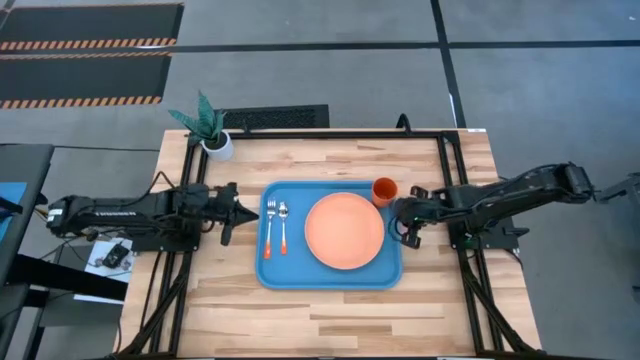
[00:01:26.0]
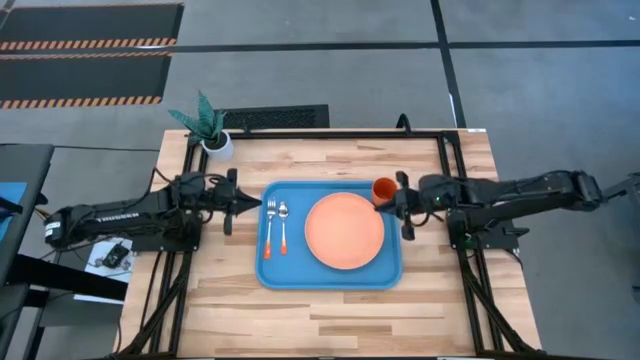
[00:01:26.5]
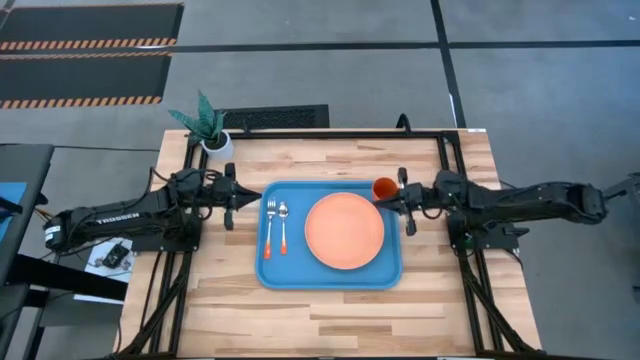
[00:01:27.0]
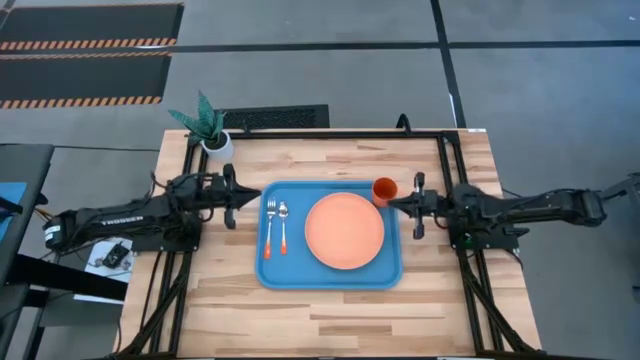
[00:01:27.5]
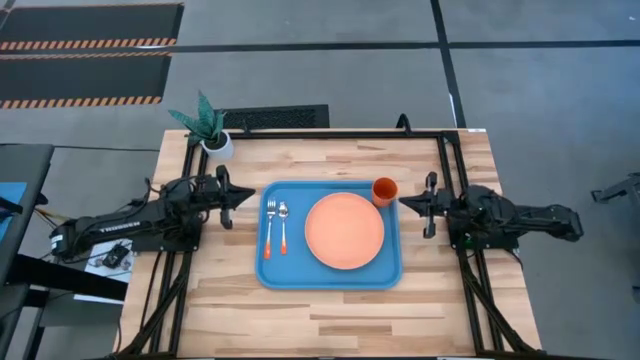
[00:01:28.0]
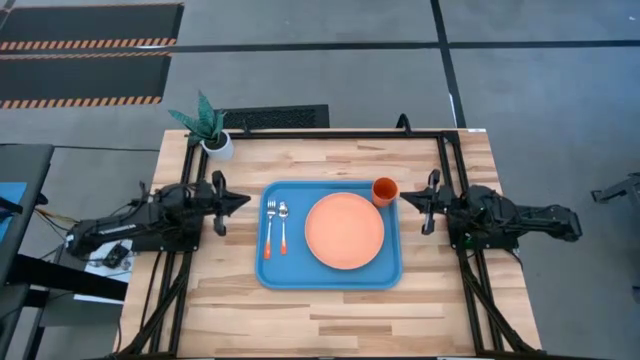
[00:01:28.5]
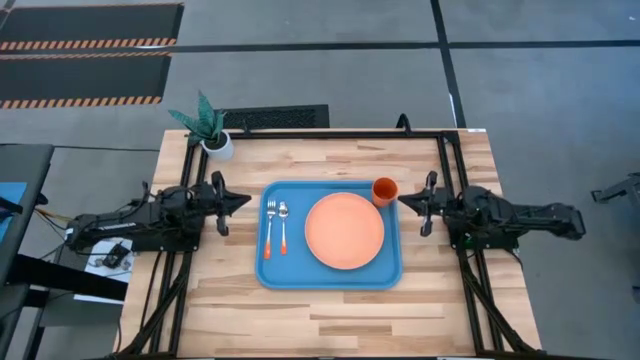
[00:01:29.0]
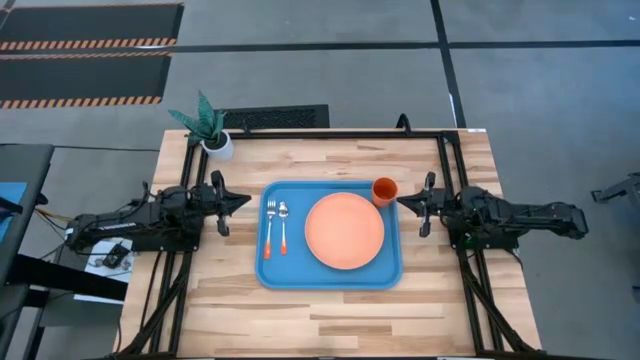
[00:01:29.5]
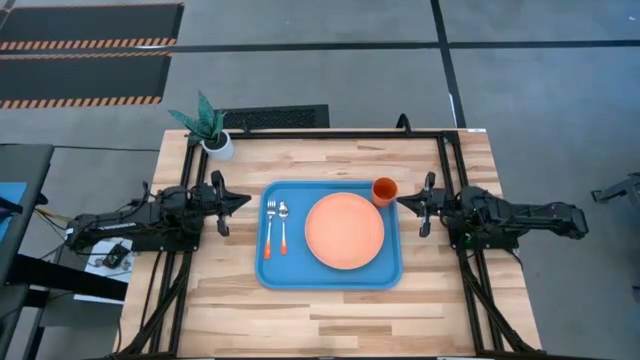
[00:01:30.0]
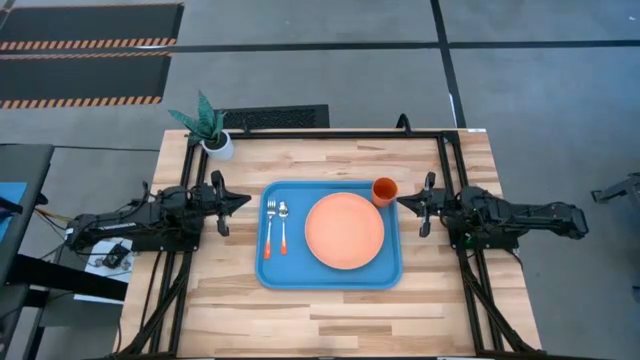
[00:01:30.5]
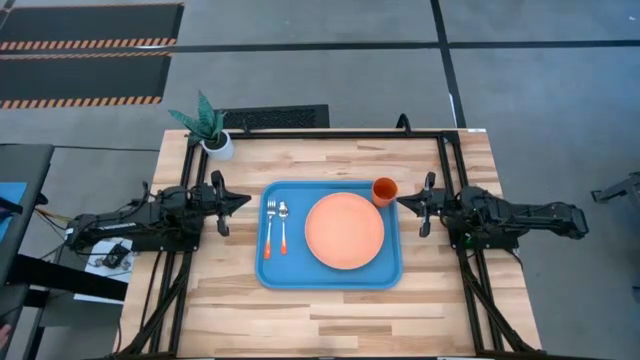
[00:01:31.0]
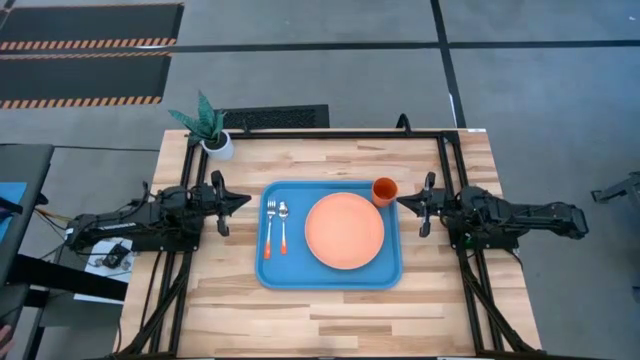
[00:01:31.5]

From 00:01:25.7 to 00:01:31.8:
Task: Pick and place plate/cup/fork/spoon on tray
Return to Home Position

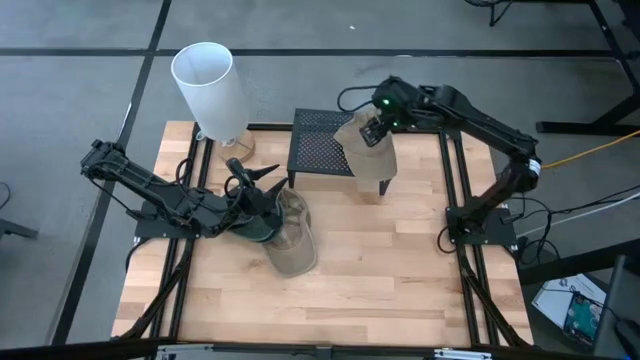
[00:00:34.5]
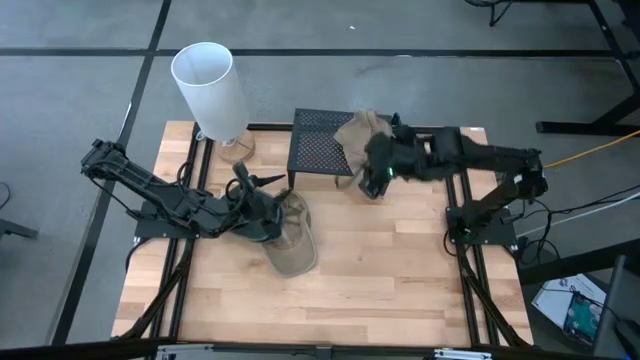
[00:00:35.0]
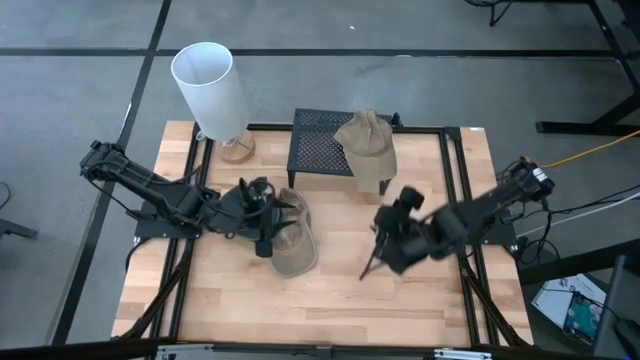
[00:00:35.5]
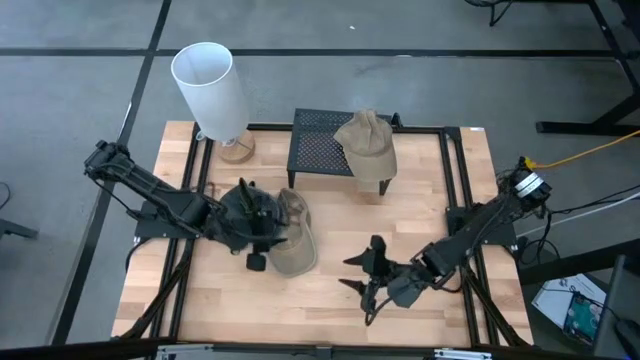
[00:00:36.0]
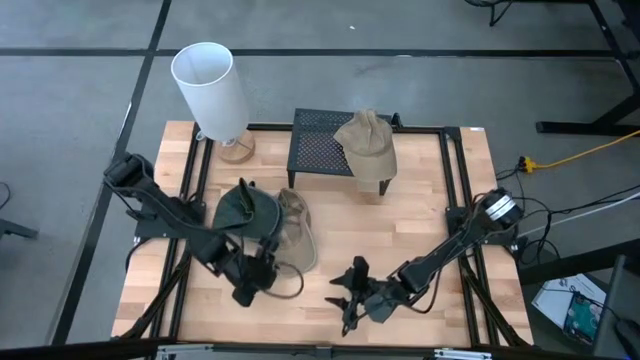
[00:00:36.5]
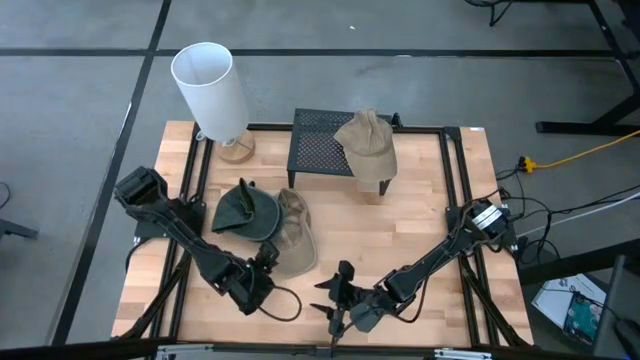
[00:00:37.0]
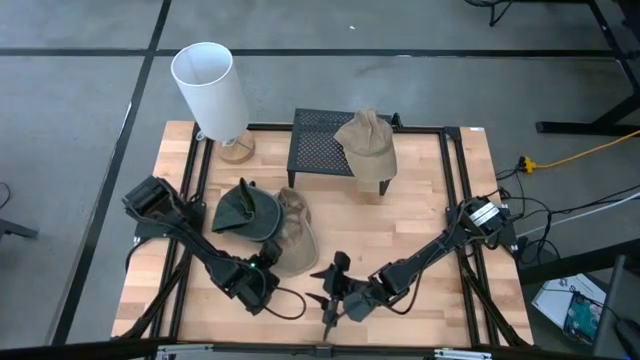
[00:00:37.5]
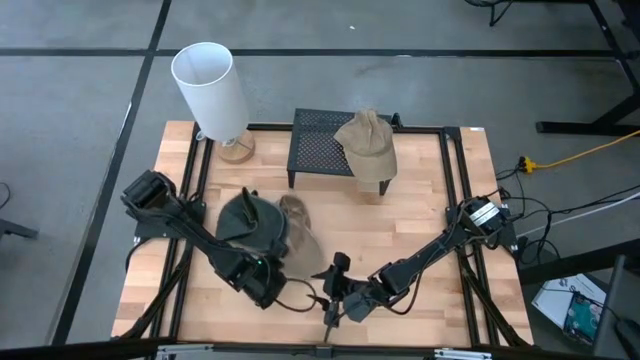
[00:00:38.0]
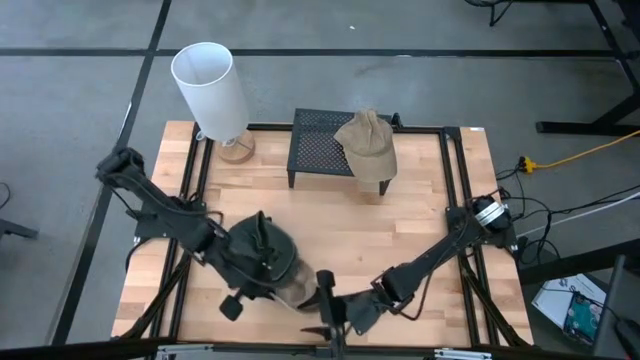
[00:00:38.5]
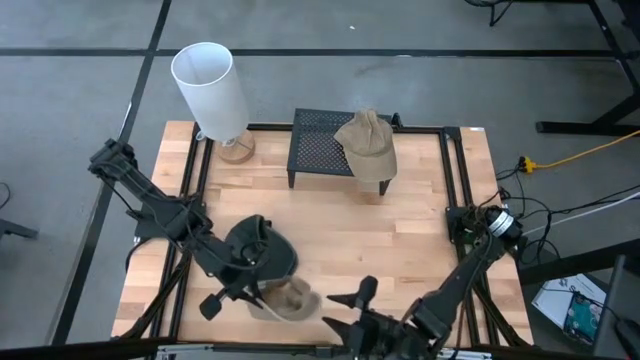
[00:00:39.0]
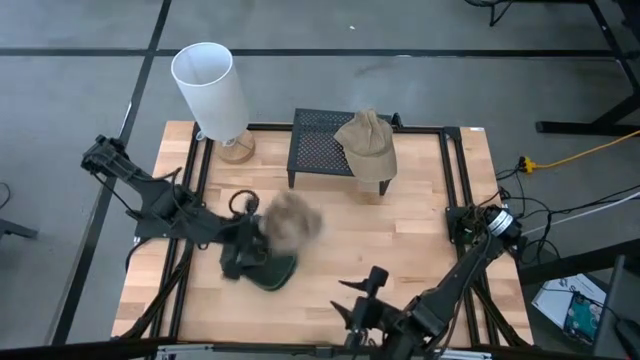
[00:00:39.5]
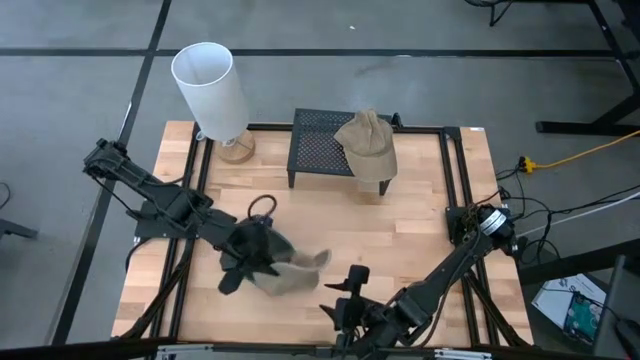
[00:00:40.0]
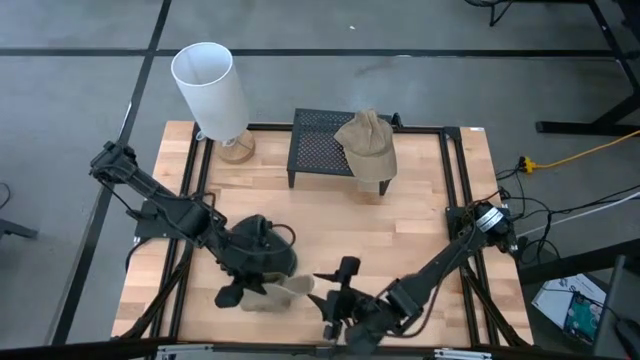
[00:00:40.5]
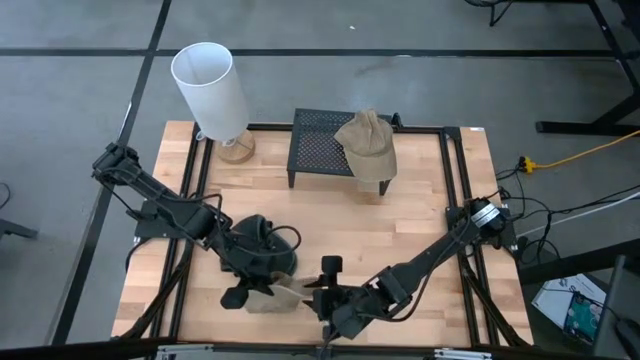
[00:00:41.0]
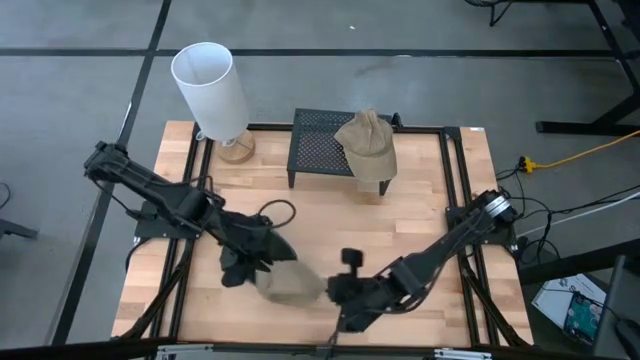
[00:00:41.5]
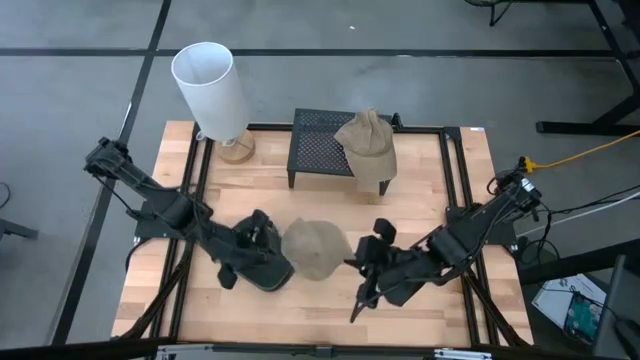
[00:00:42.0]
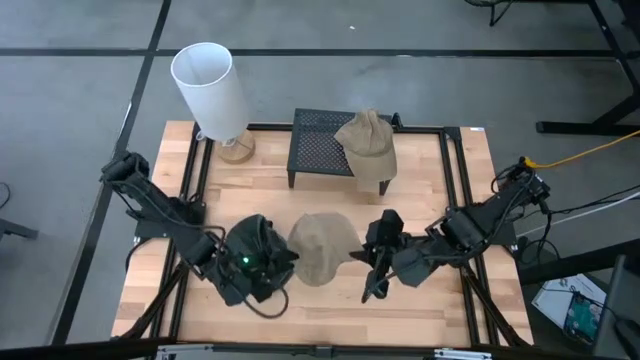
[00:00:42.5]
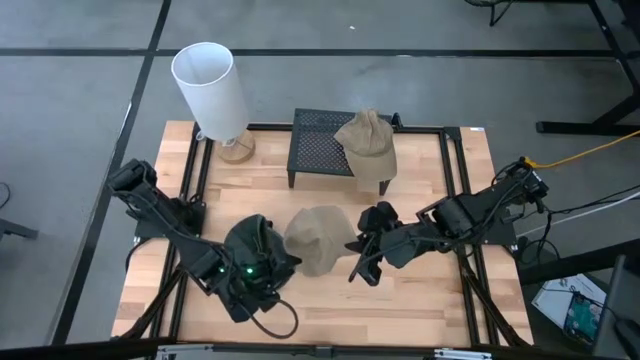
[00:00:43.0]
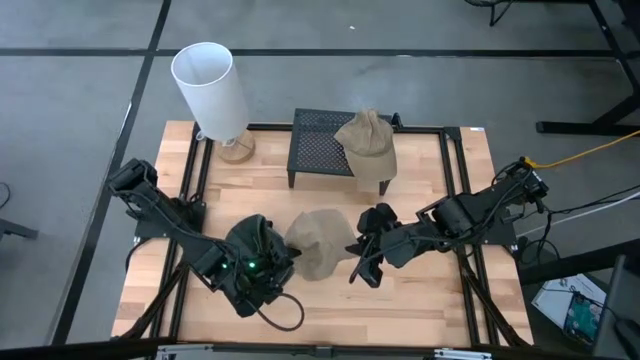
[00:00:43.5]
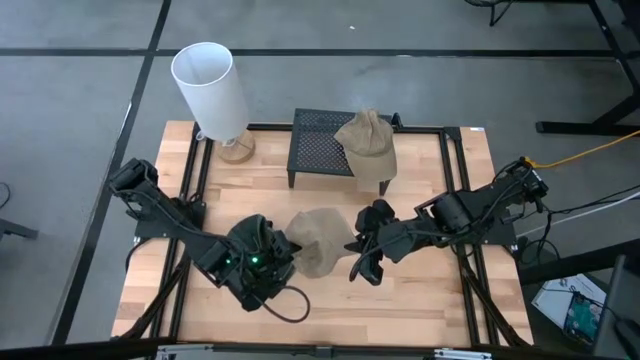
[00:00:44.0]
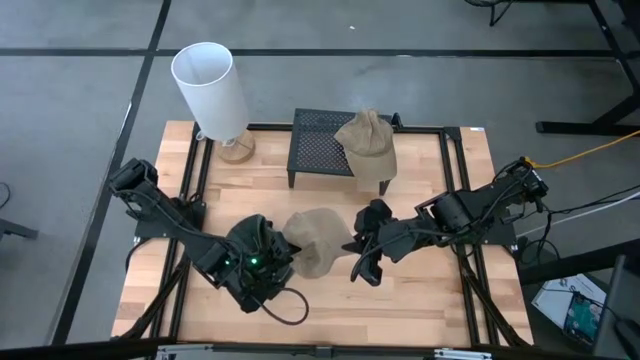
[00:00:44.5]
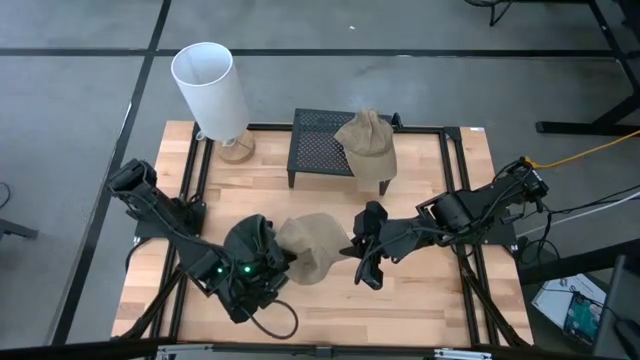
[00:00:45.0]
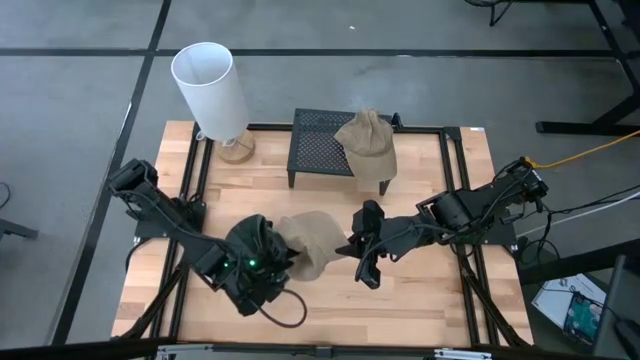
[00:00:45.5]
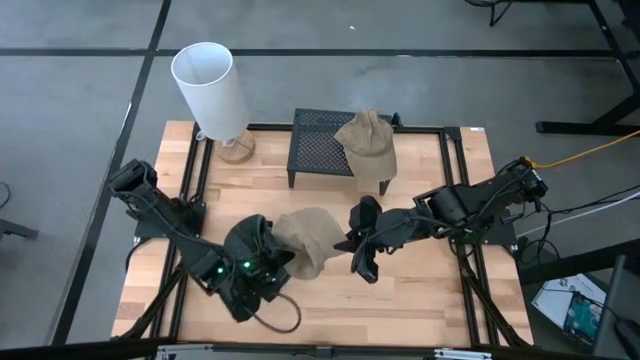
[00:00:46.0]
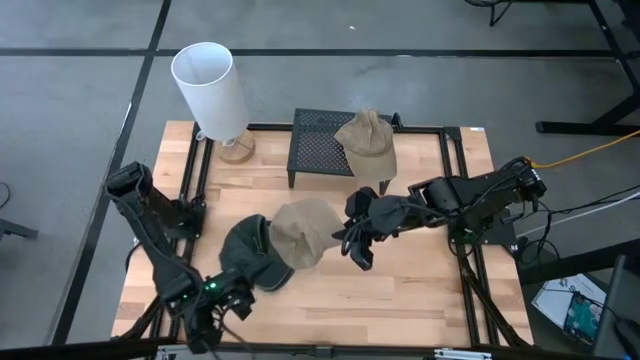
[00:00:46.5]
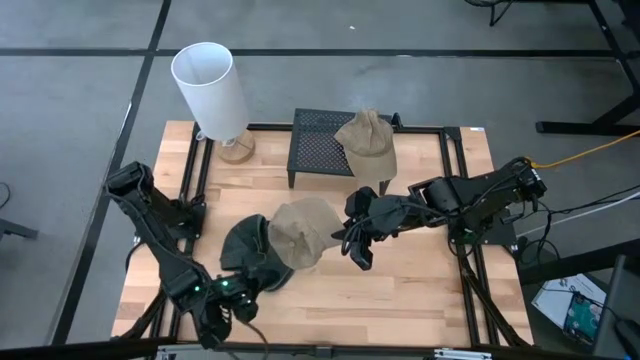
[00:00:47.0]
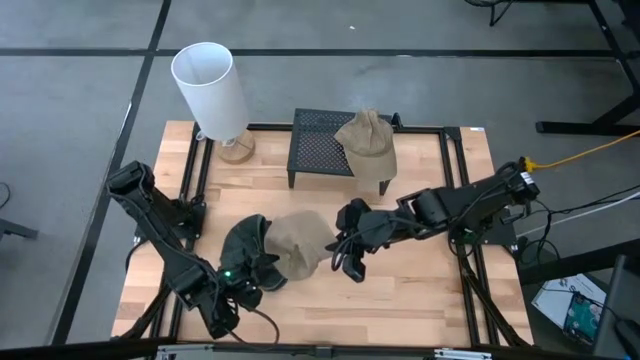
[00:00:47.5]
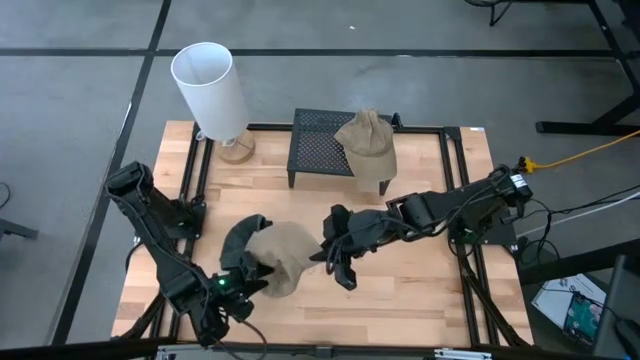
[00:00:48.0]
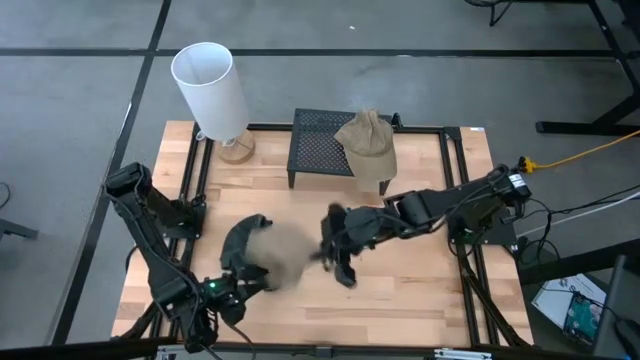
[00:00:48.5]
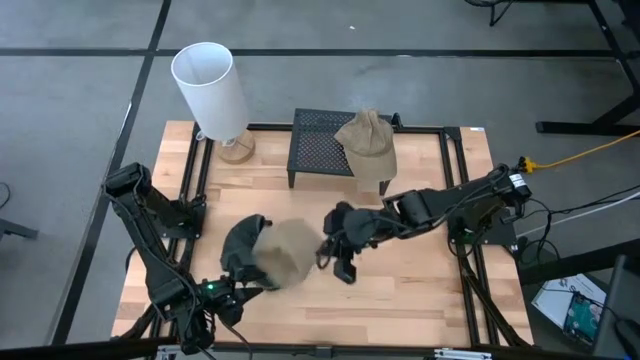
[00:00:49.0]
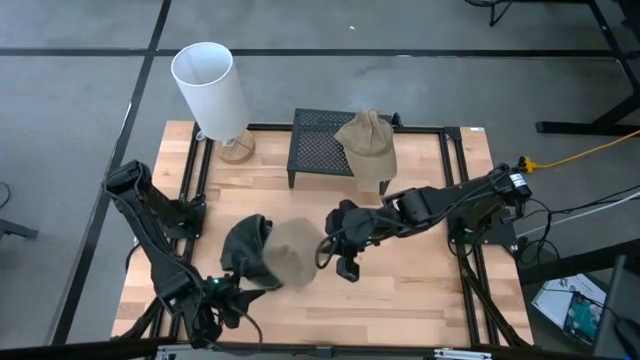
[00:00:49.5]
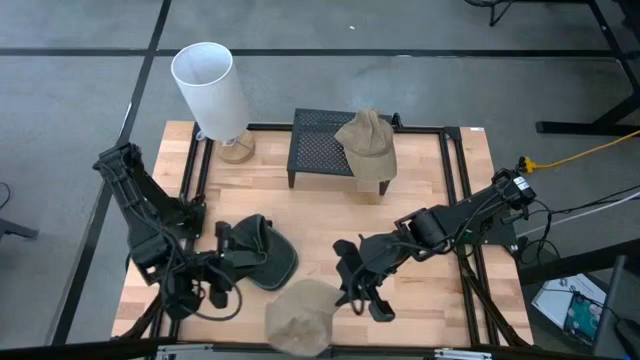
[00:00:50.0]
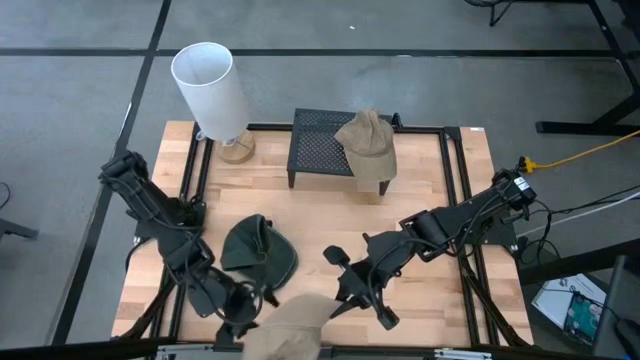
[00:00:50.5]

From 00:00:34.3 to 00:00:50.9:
Task: Pick & Place hat
Put the brown cap on the shelf
